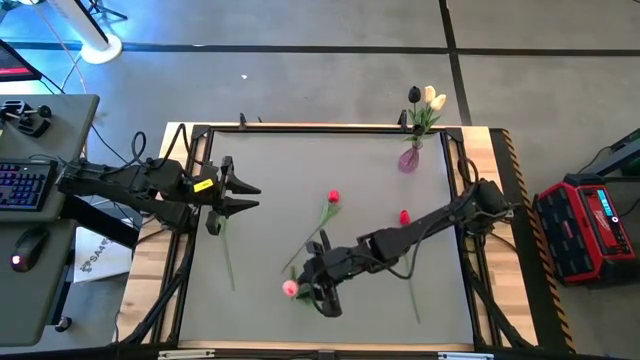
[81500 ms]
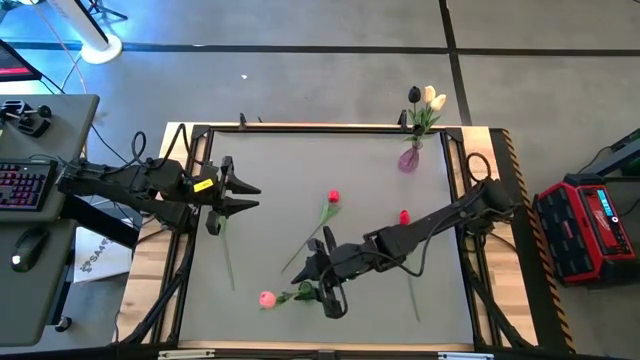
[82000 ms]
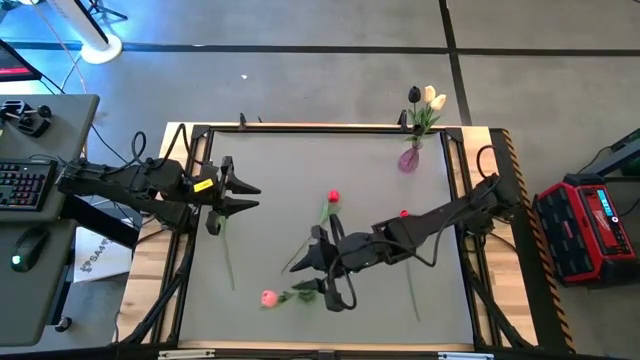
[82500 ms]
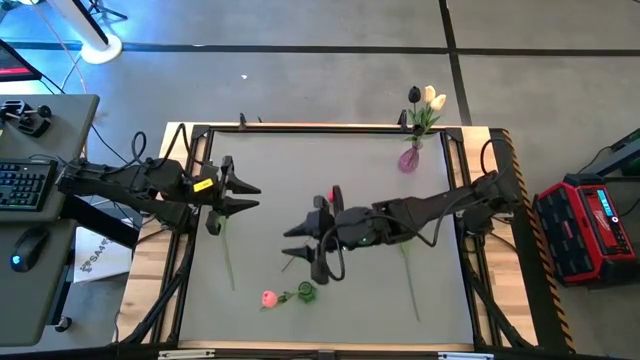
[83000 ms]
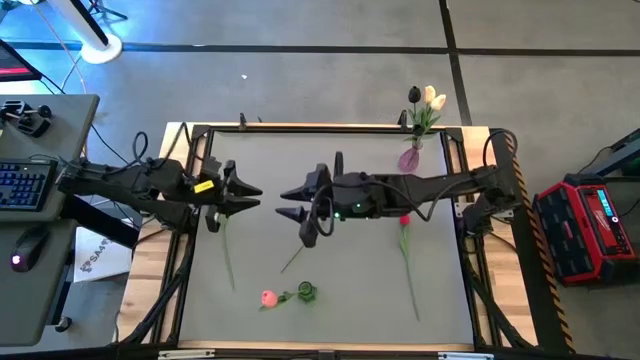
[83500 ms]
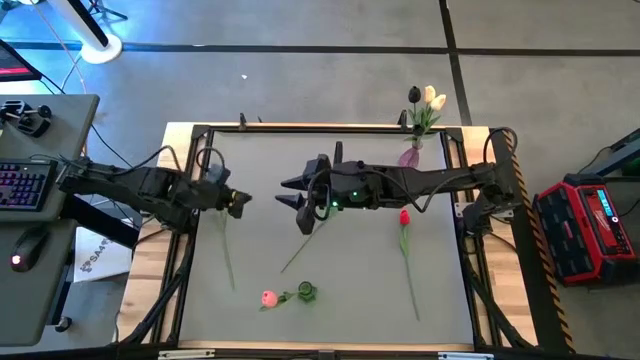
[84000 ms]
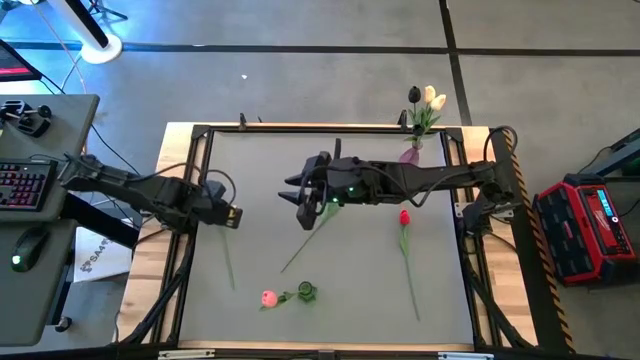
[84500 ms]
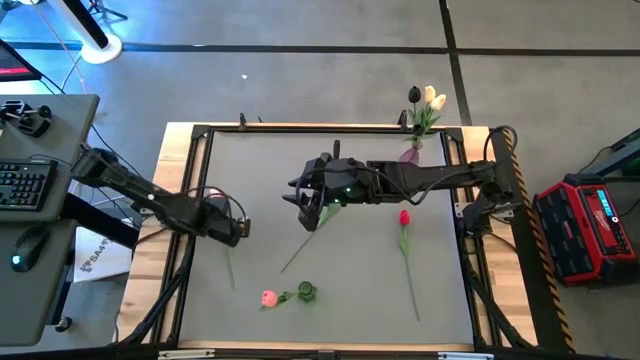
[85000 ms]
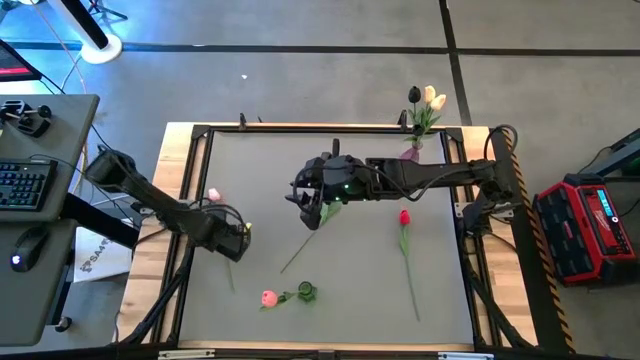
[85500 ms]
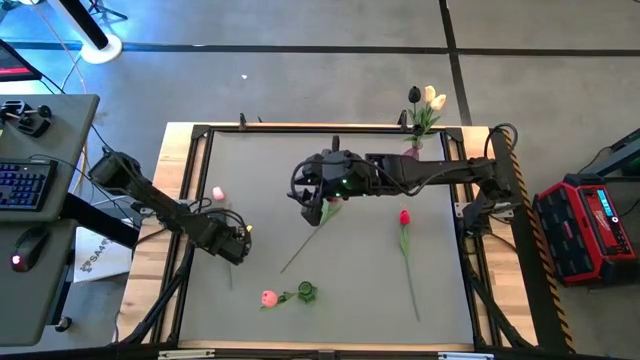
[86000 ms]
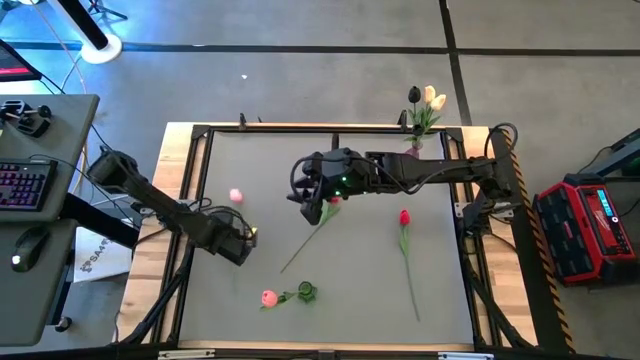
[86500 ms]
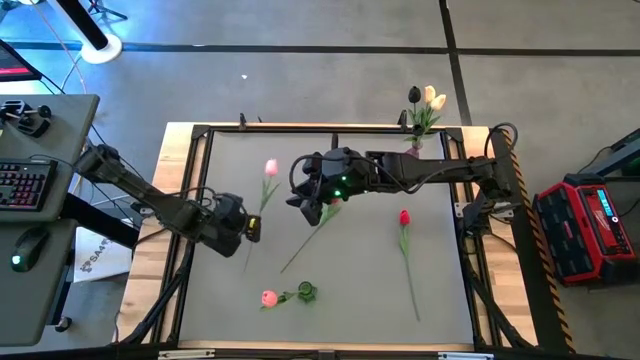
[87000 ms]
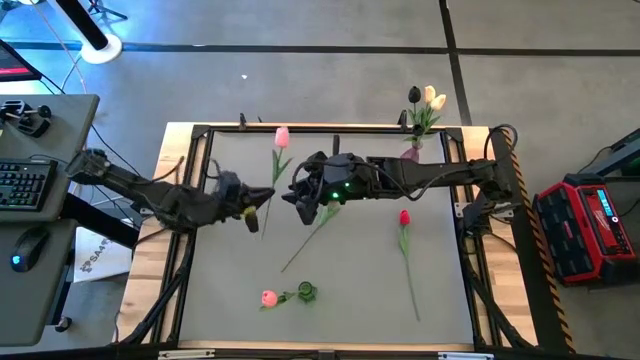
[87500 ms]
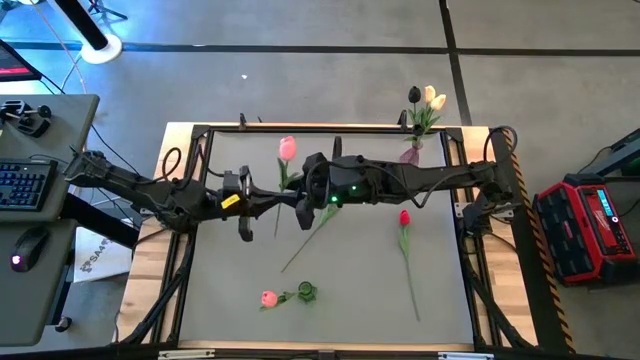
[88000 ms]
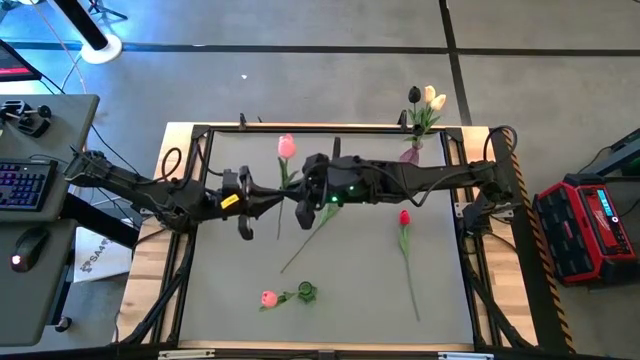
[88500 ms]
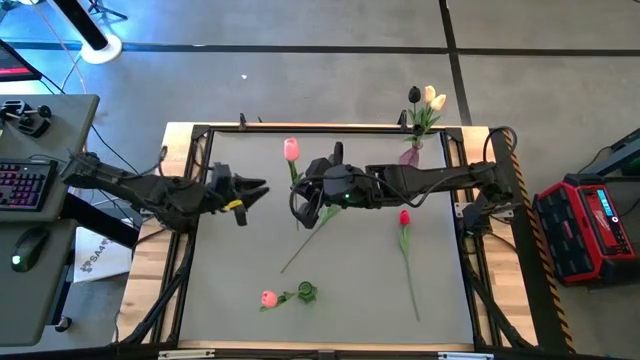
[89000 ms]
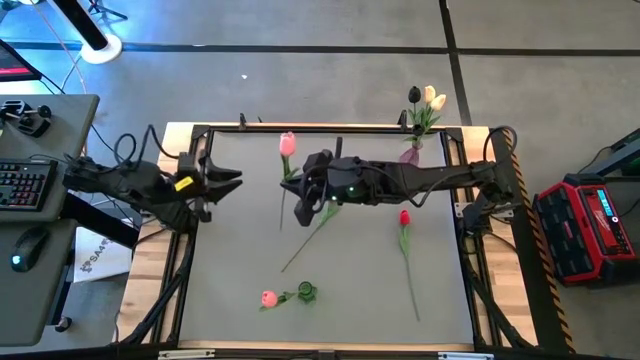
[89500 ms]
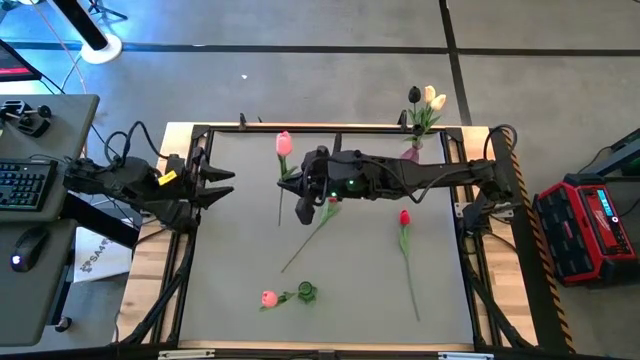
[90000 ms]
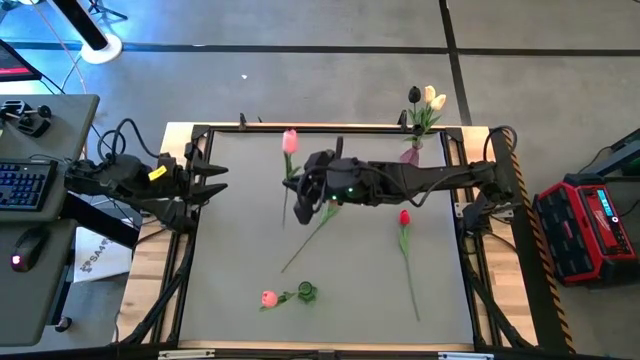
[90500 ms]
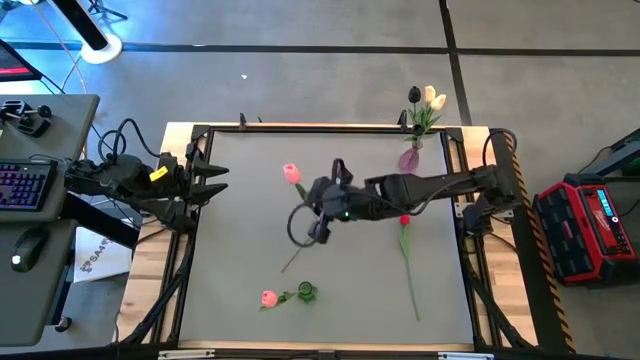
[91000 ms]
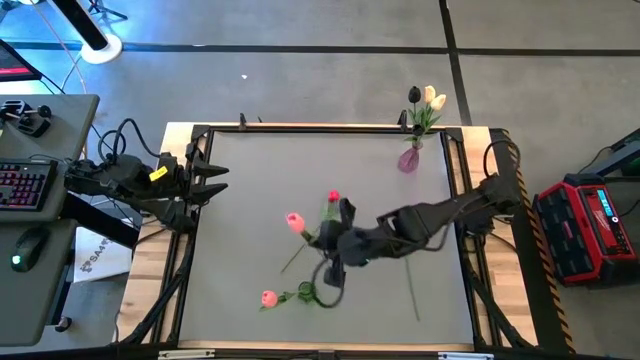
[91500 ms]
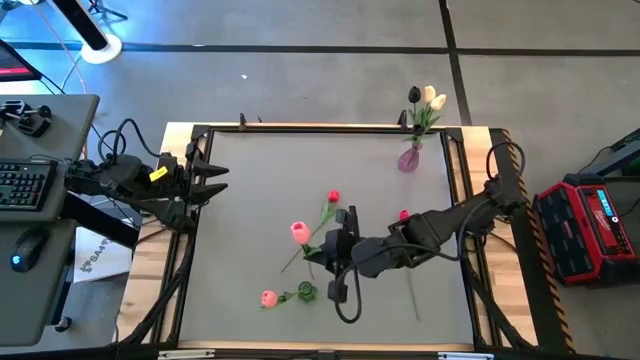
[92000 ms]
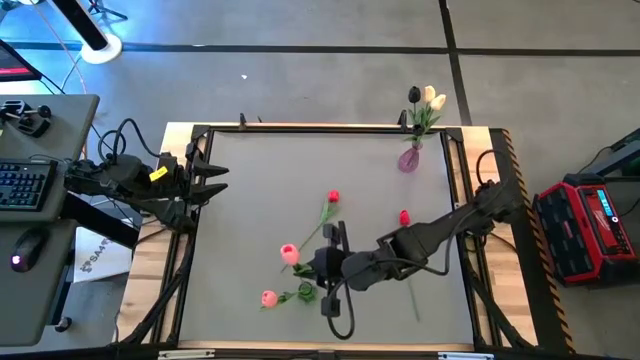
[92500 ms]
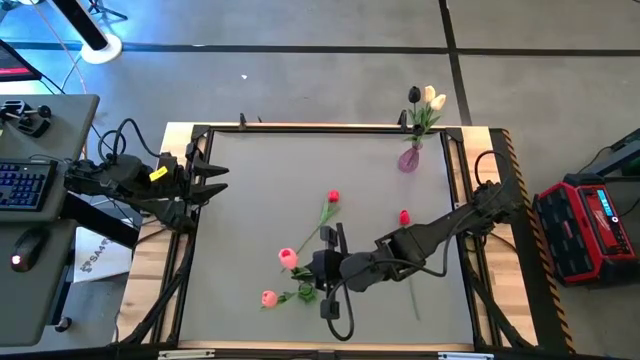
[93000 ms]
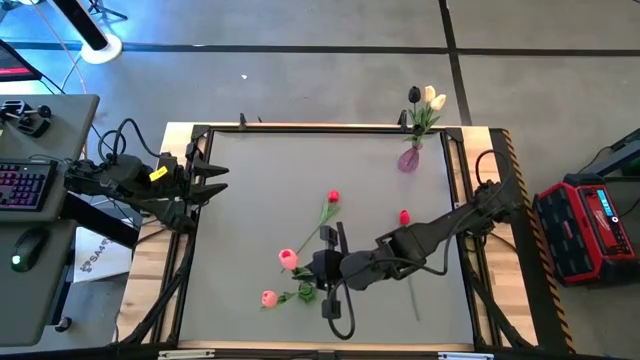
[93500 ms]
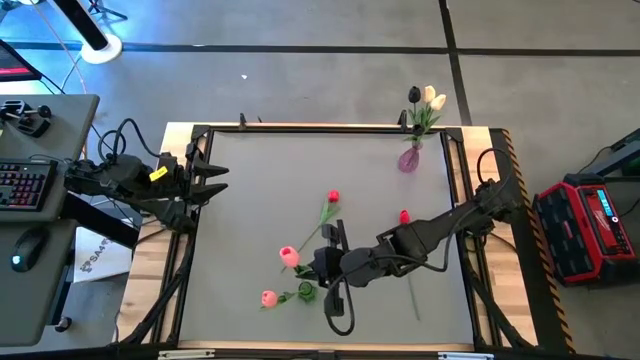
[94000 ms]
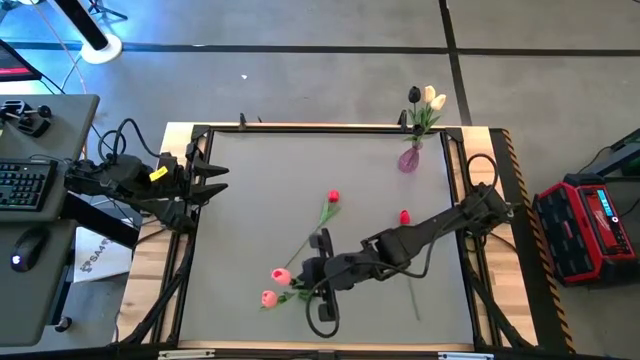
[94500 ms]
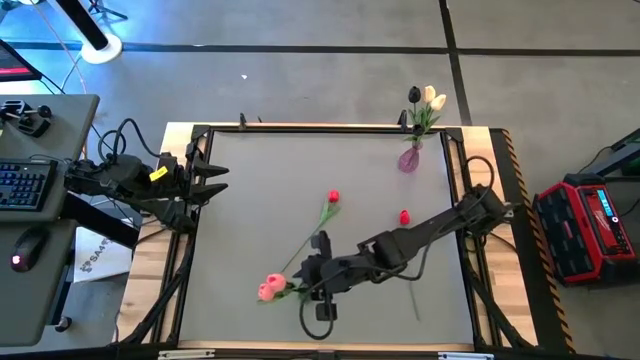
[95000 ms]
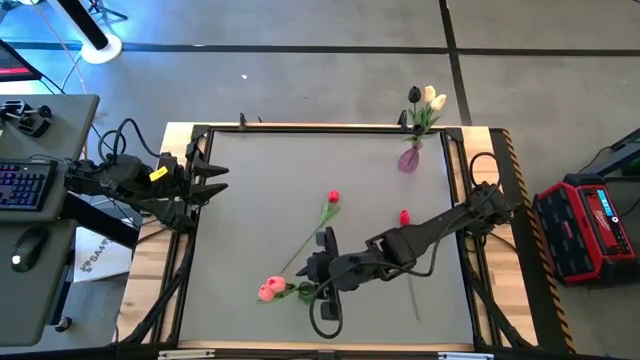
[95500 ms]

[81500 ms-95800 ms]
Task: Sort flowers into vase by color
Put the pink flower into the green vase
